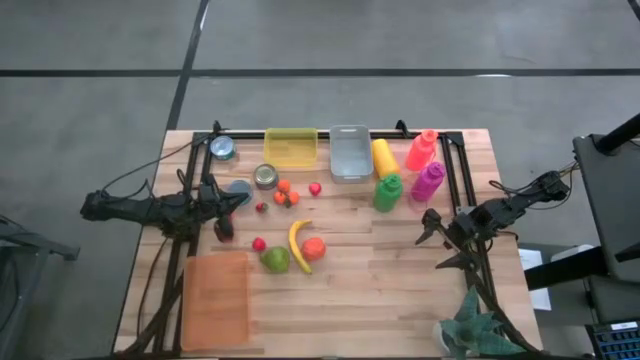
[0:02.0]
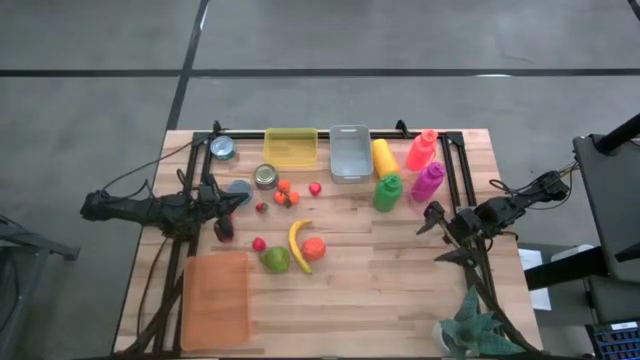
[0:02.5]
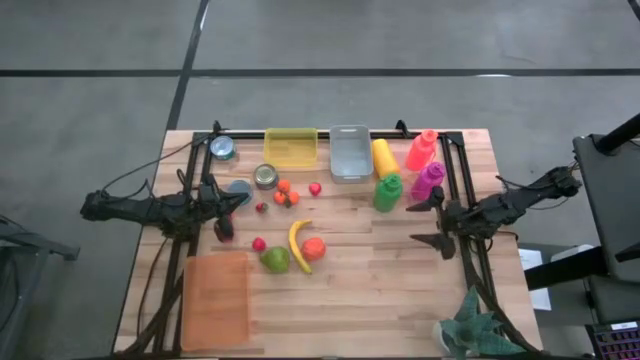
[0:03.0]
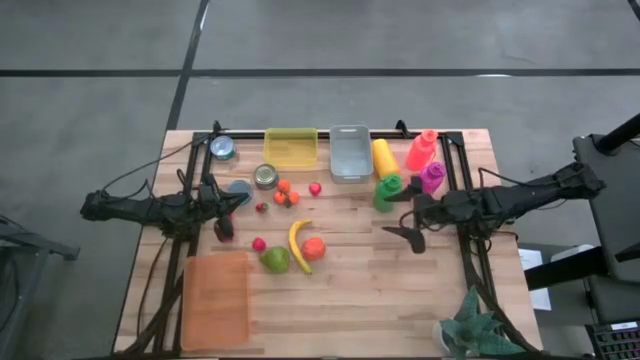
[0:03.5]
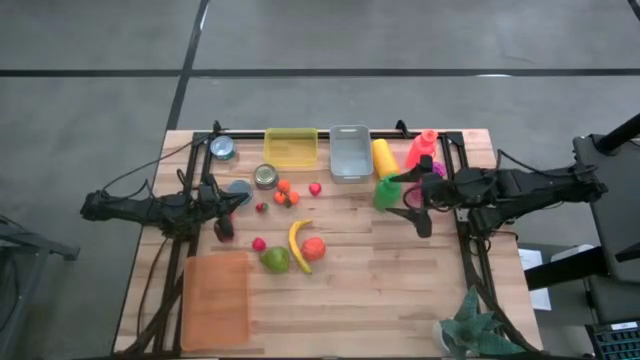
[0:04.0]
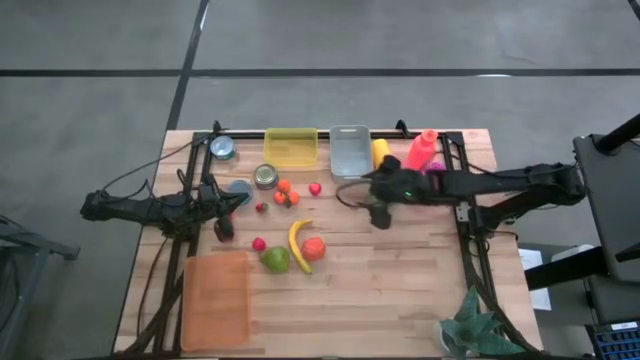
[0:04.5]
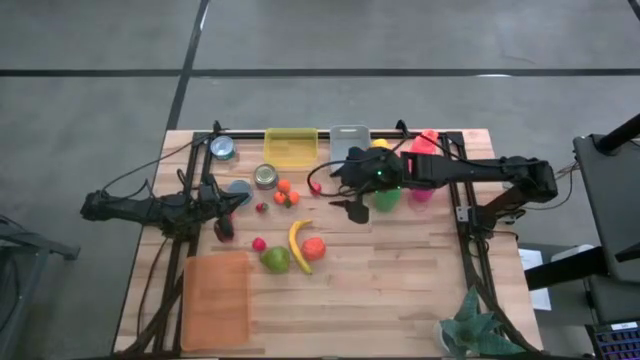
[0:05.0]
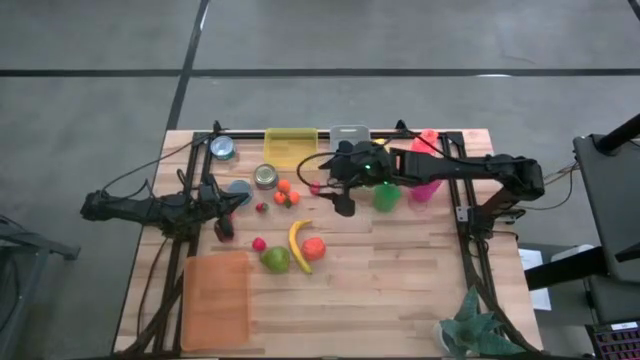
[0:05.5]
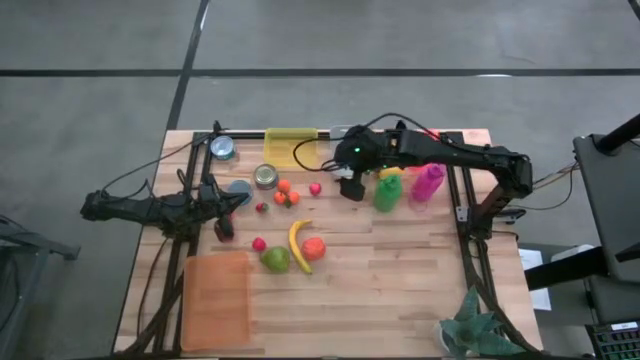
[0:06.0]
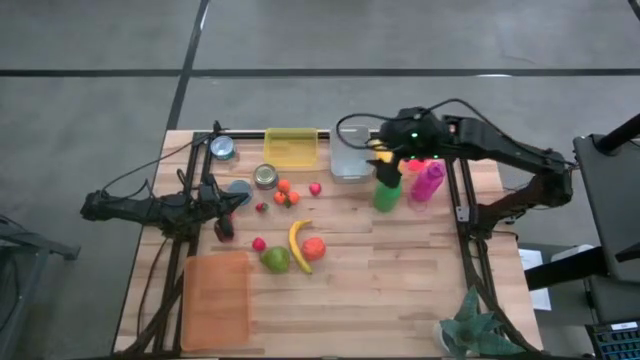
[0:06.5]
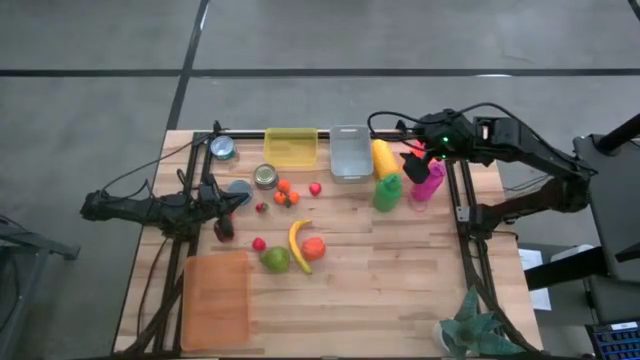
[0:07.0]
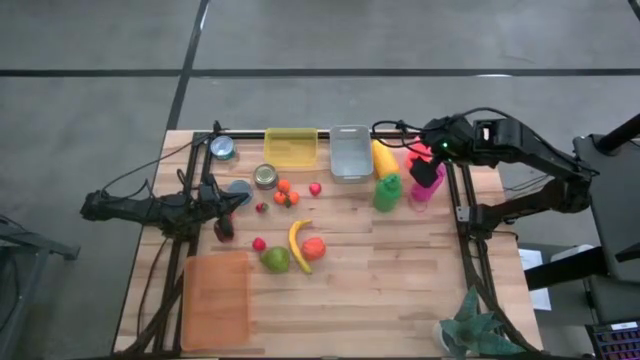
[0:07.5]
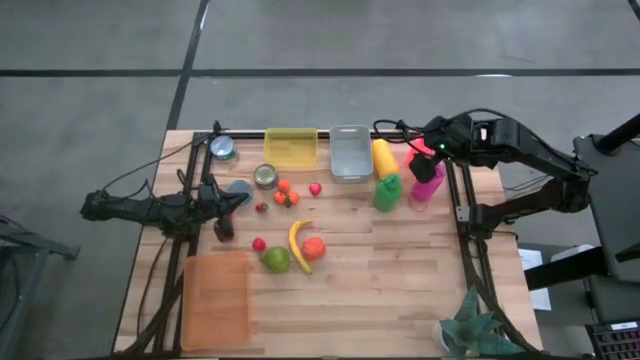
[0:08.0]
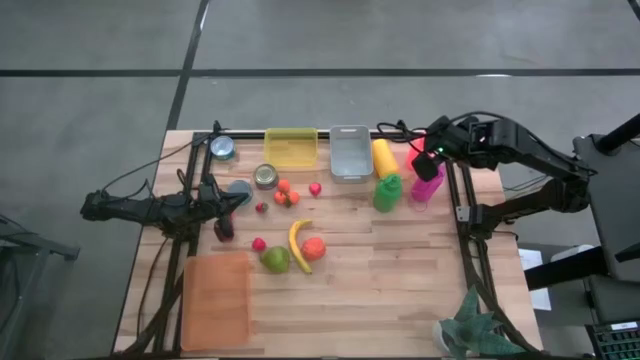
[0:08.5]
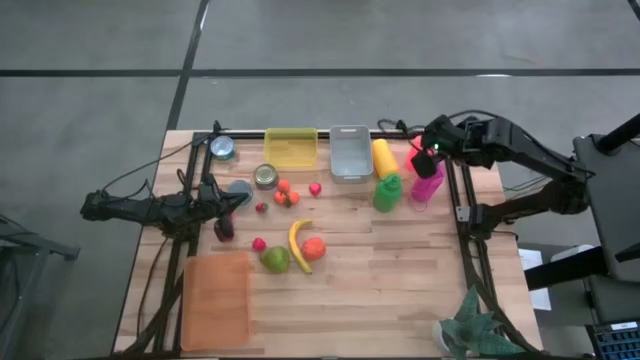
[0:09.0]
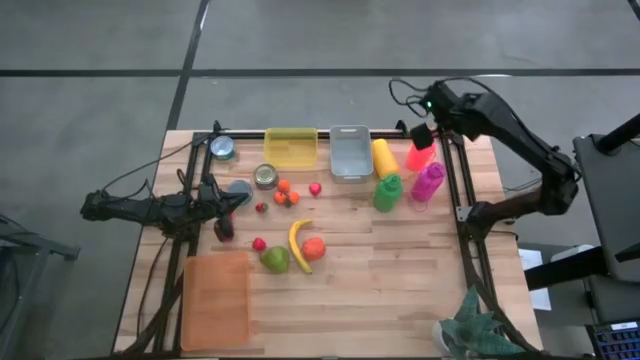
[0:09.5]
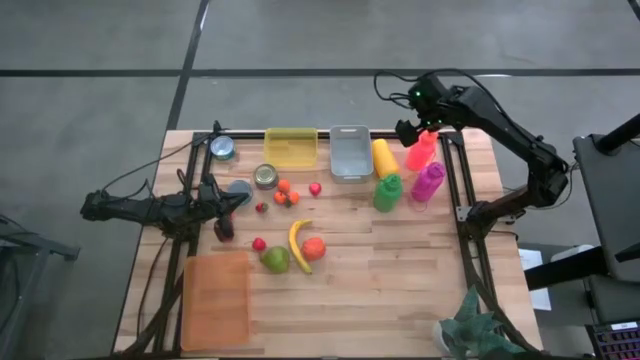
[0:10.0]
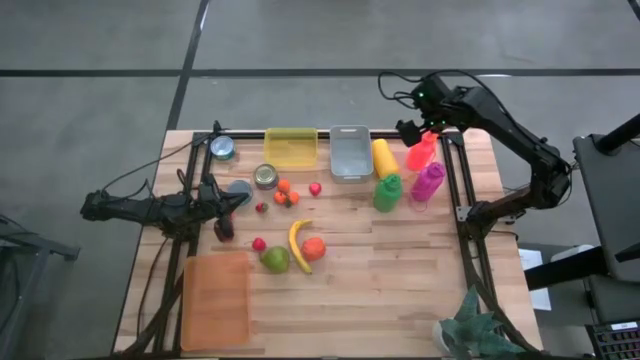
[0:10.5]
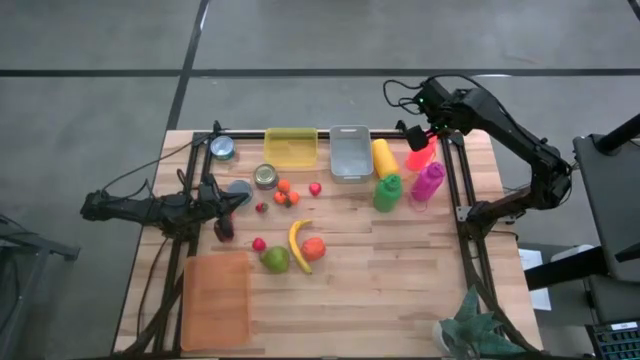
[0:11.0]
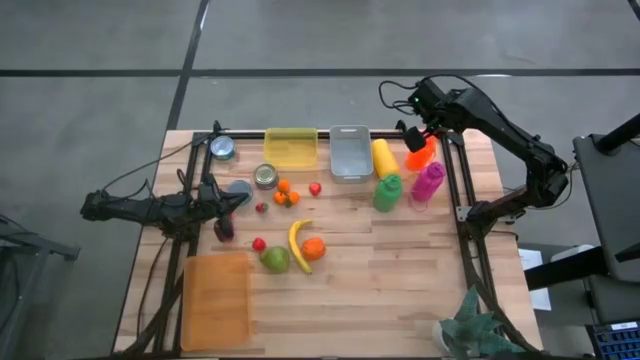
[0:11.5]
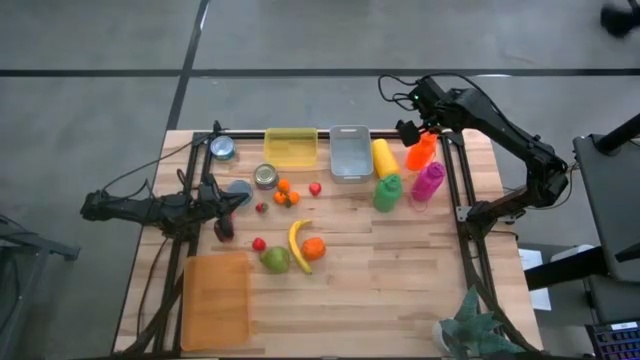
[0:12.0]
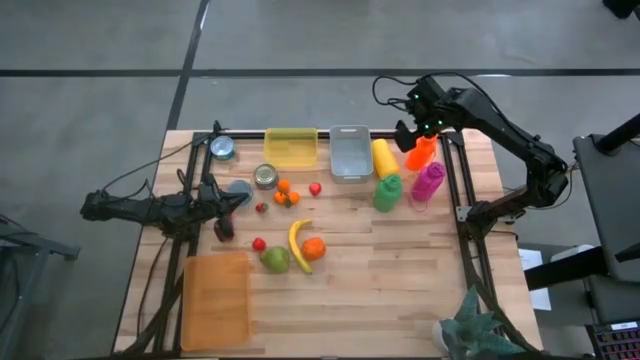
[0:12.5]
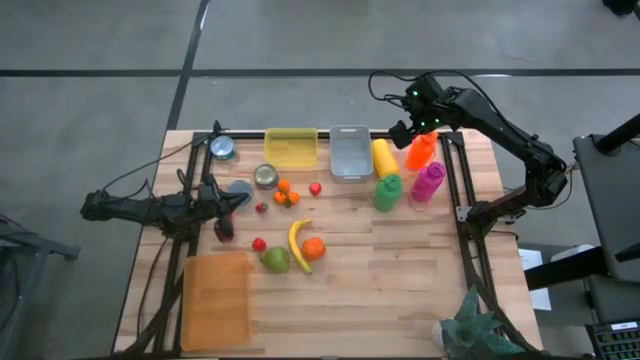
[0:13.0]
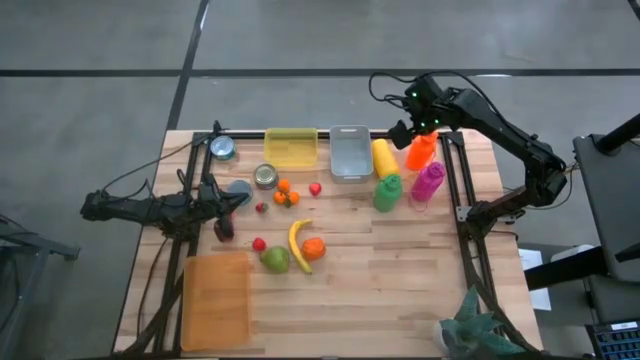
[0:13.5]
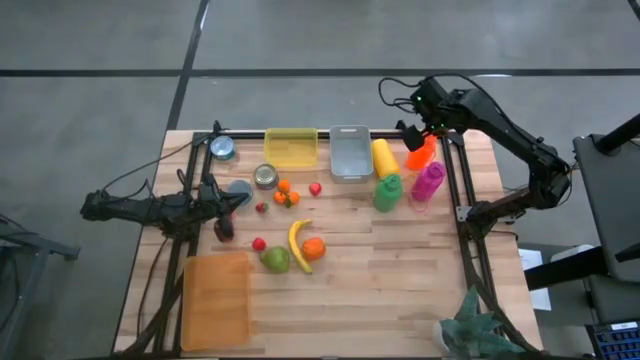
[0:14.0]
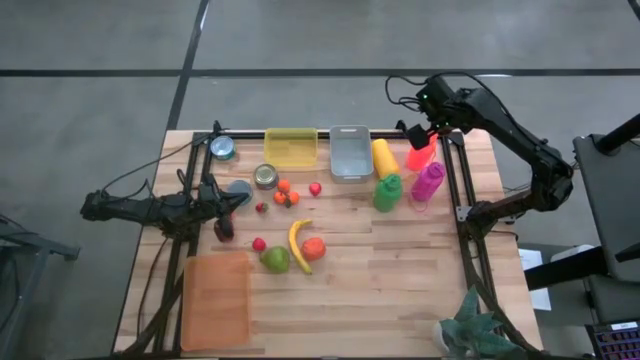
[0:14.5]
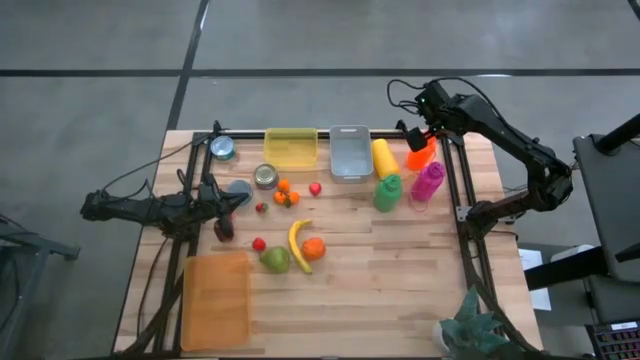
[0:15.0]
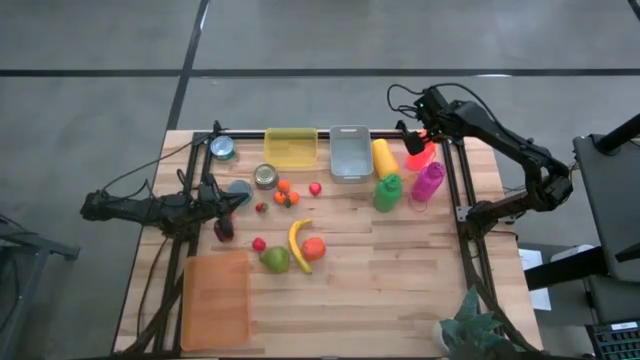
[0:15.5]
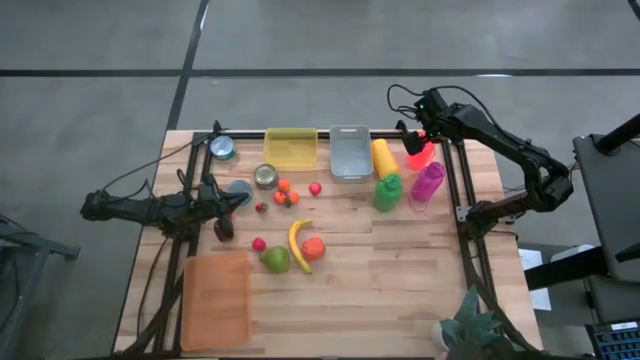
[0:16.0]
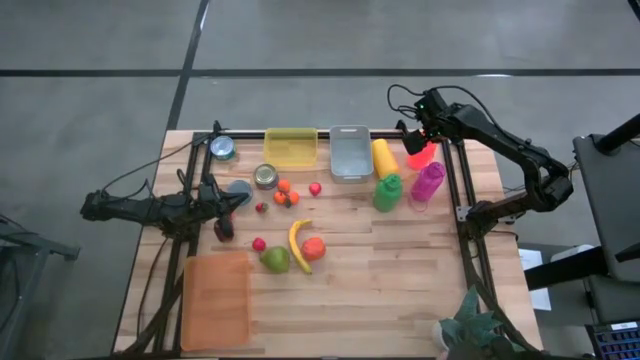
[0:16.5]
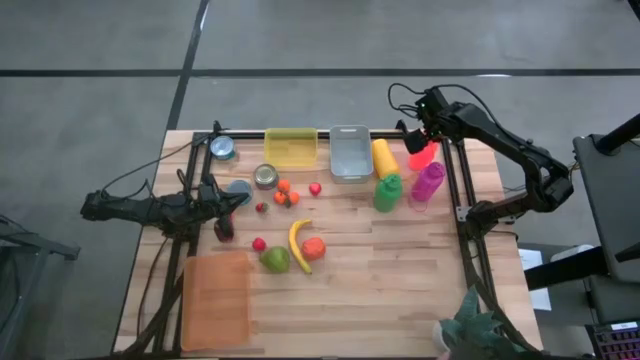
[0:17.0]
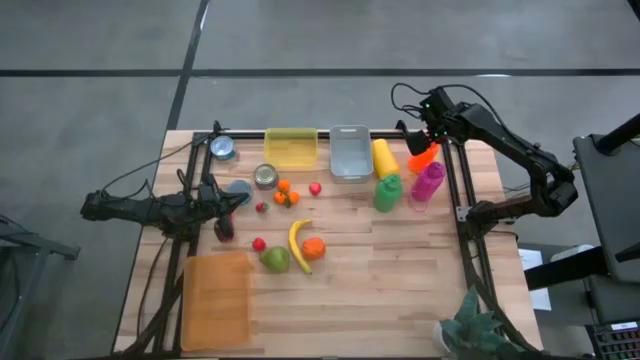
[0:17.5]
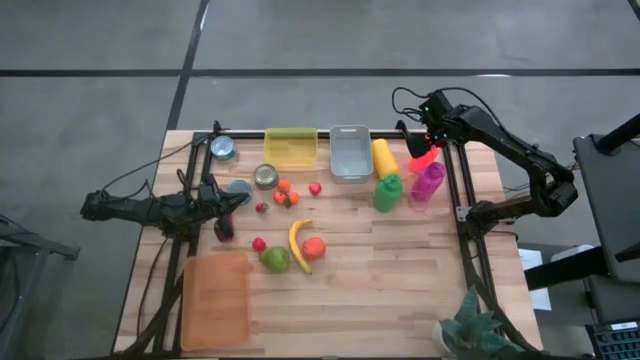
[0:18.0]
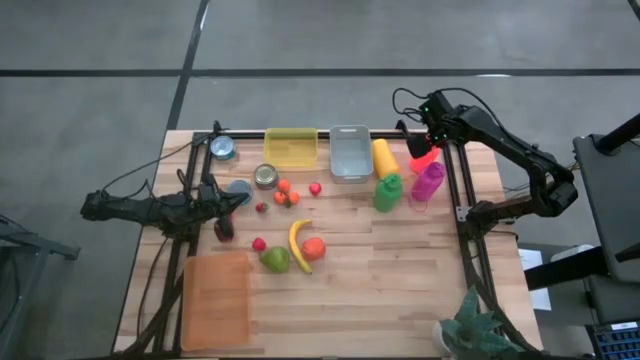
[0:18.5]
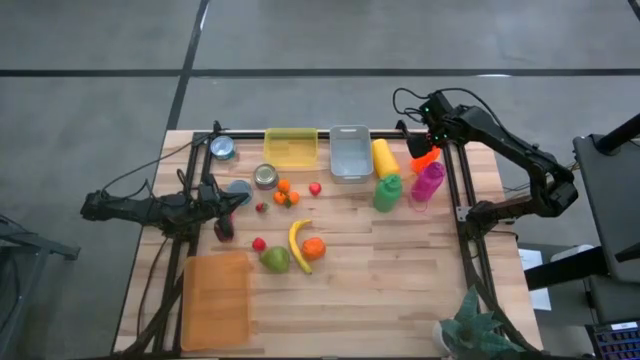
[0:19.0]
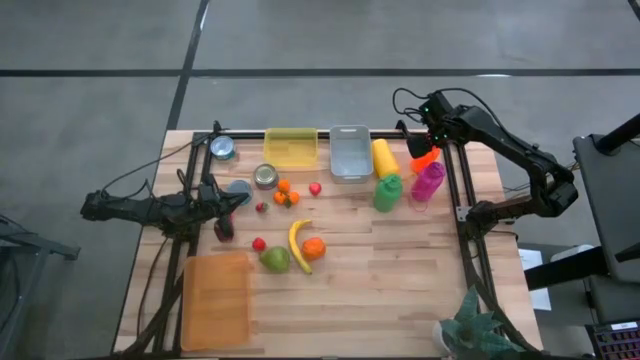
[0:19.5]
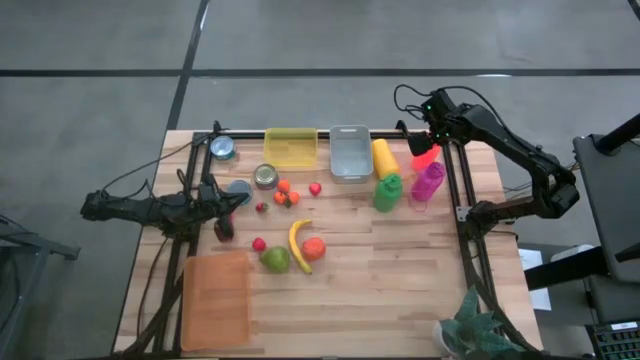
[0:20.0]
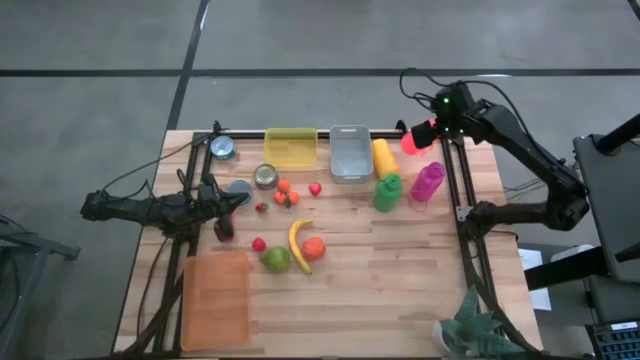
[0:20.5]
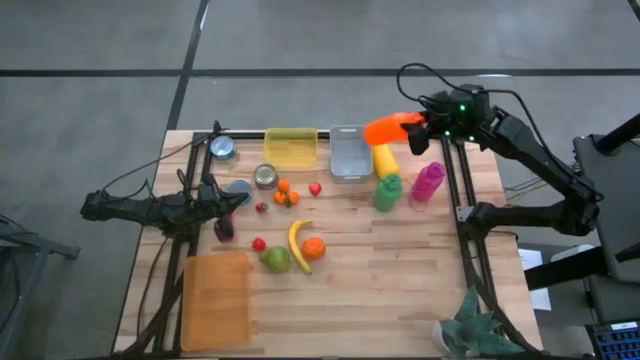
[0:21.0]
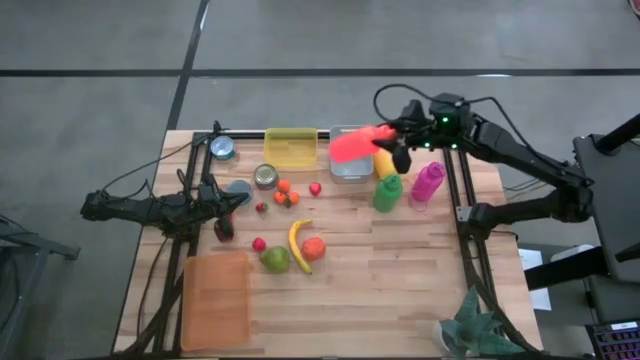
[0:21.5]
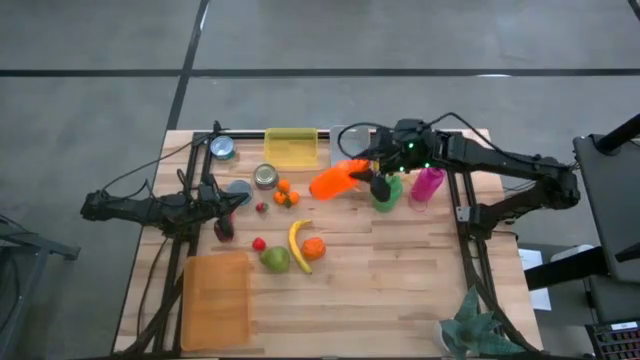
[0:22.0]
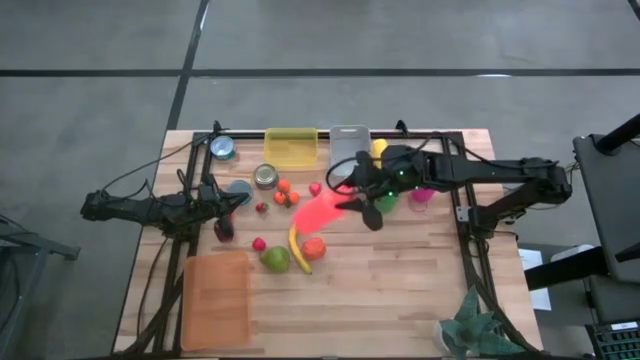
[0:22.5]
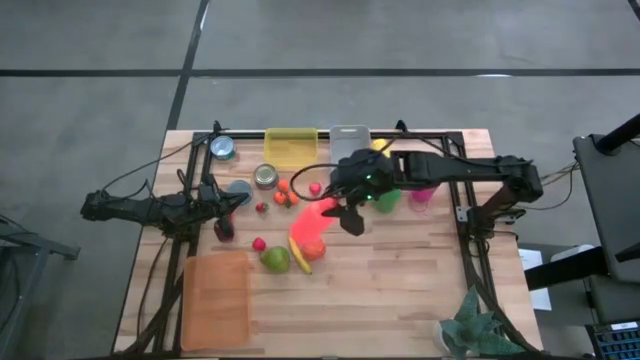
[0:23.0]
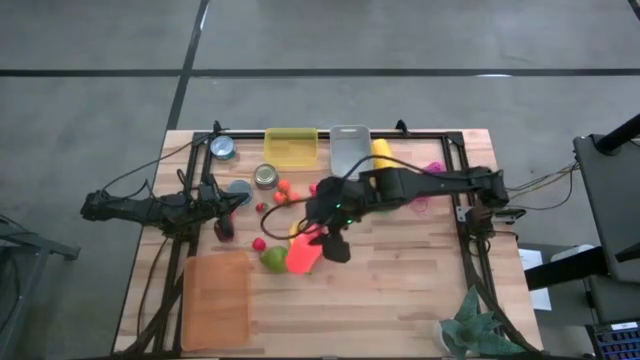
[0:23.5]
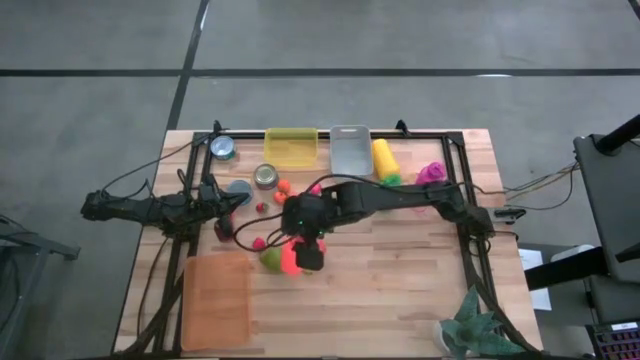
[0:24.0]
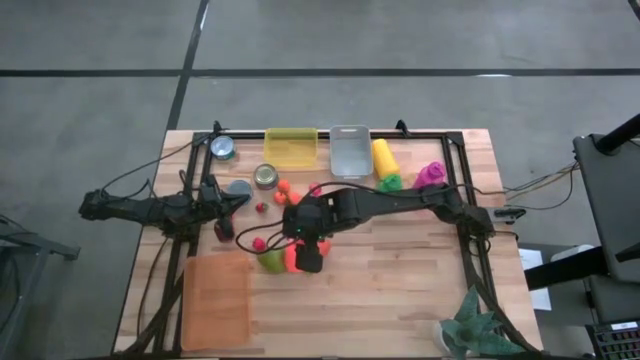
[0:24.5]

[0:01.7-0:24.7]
Task: Pick & Place Food Item
Put the orange tumbler into the orange bin
